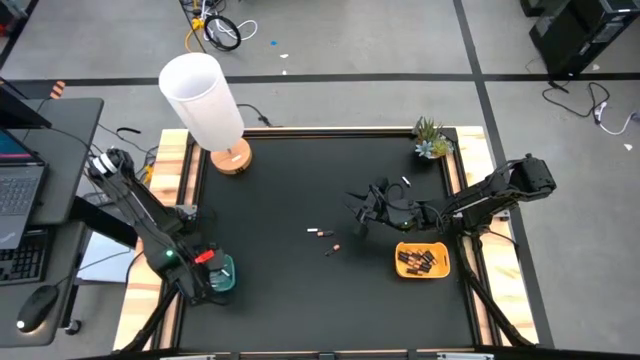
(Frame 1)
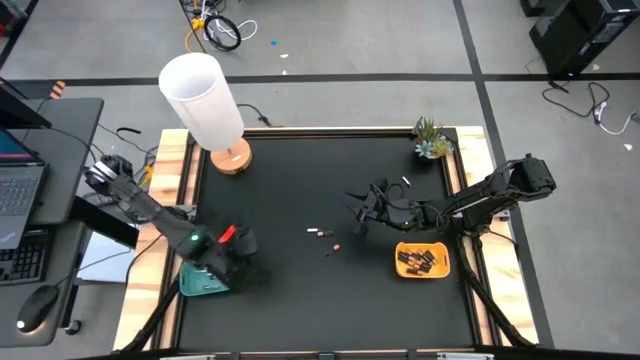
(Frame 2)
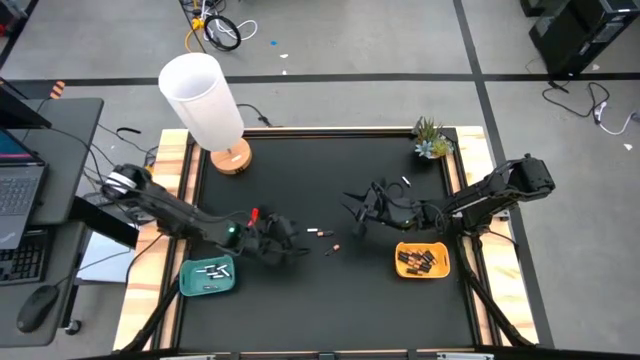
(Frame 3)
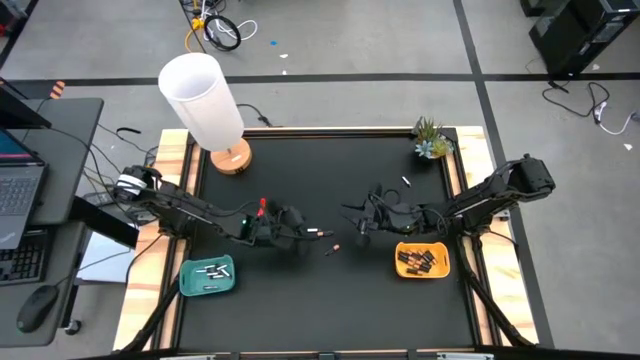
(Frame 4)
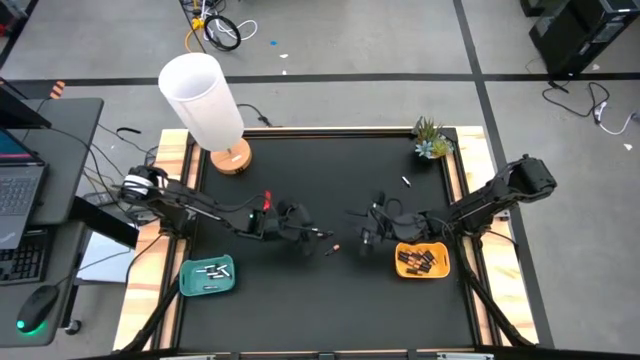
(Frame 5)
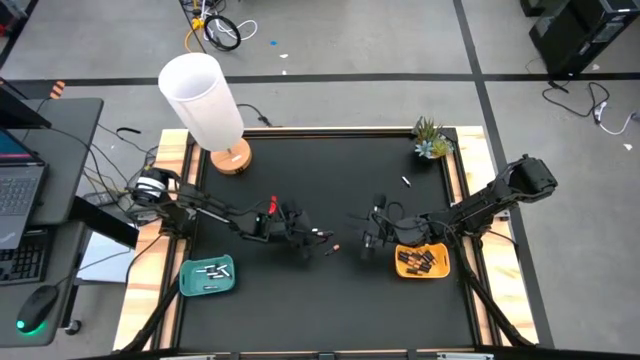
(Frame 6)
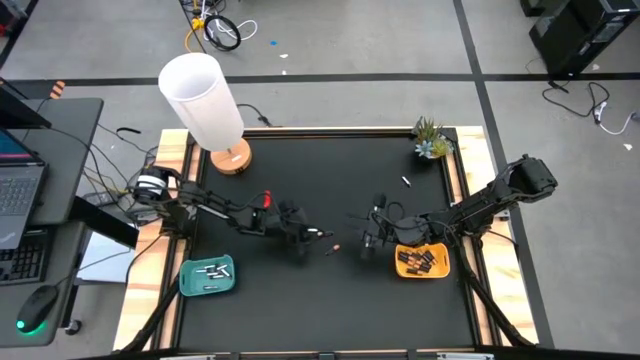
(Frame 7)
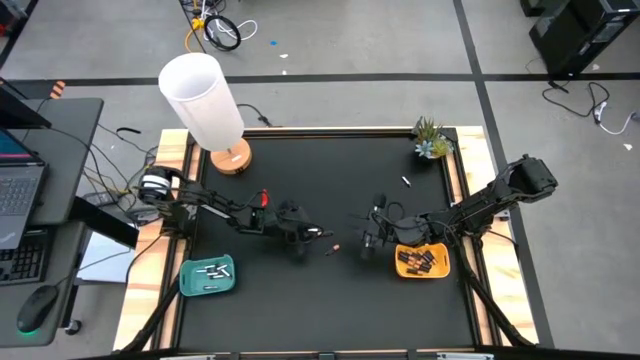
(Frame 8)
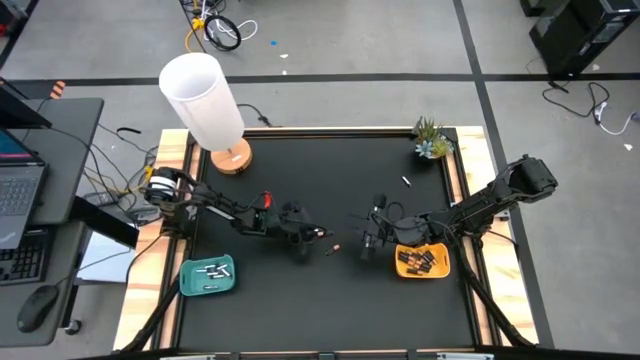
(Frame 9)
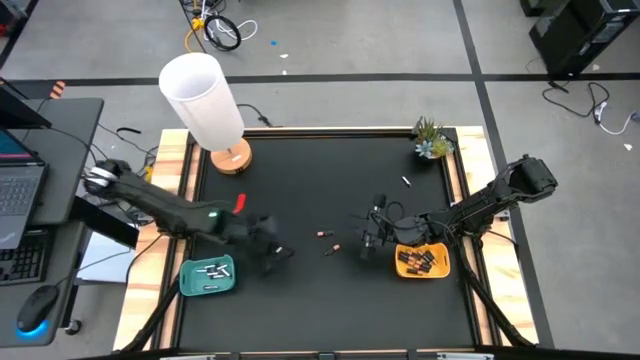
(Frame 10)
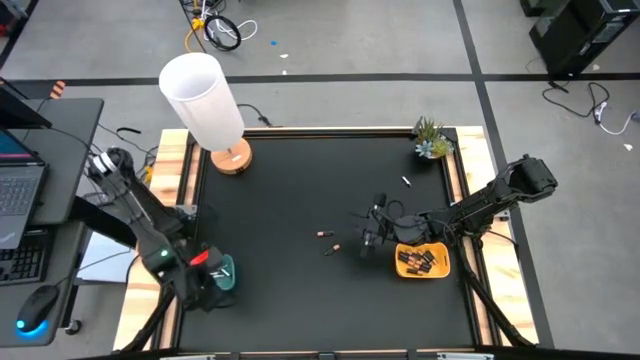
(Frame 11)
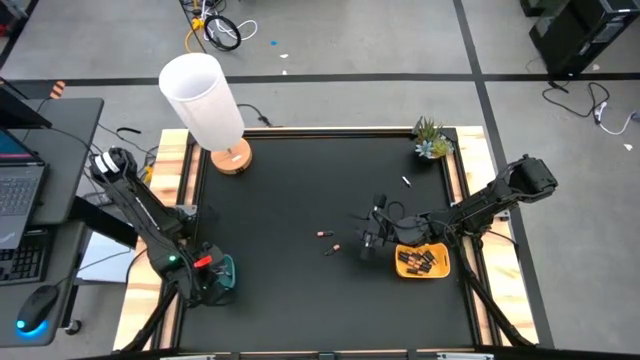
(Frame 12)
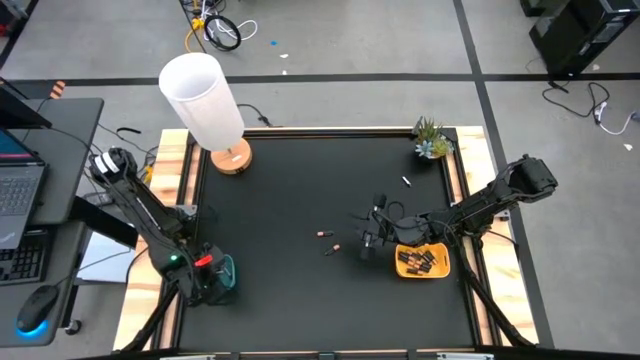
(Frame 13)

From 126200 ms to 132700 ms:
Task: Sort batteries
Put the silver battery into the green bin

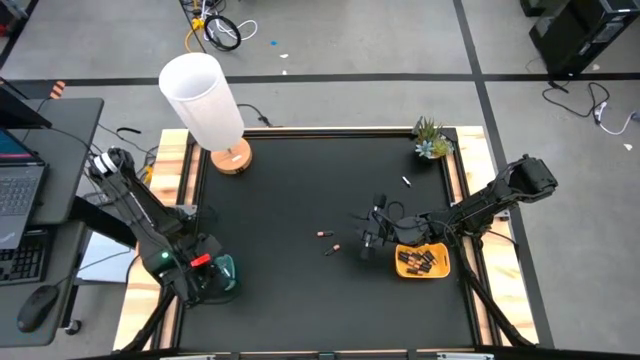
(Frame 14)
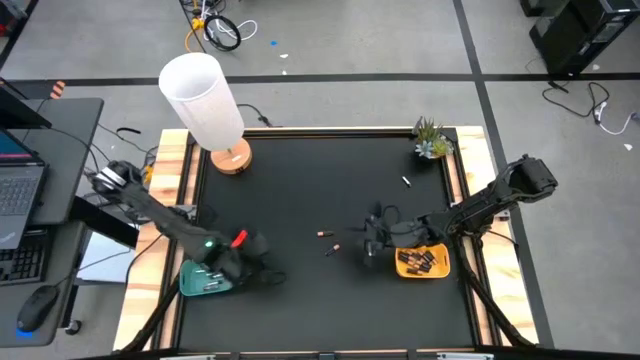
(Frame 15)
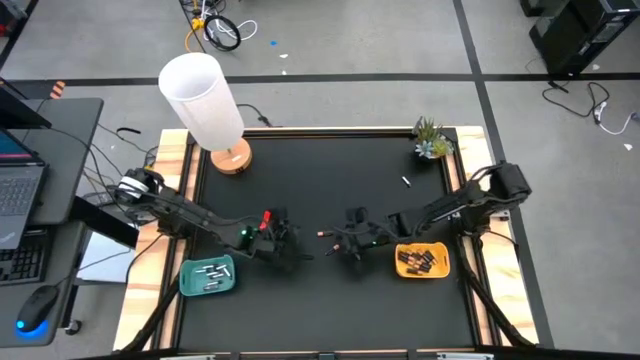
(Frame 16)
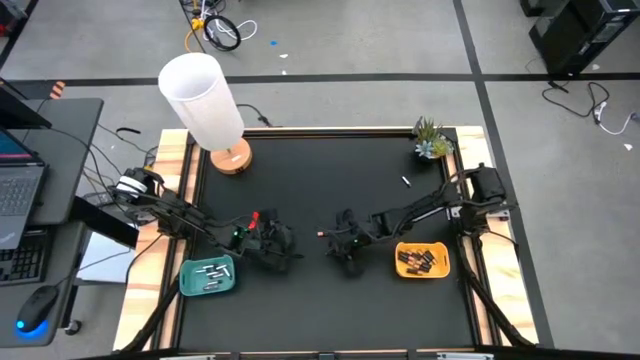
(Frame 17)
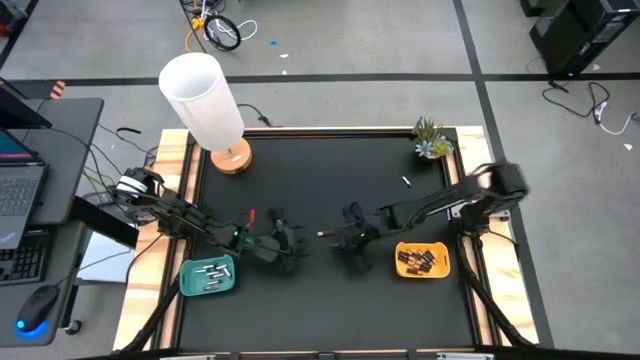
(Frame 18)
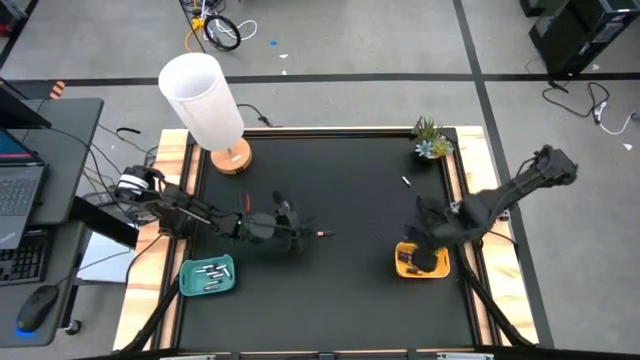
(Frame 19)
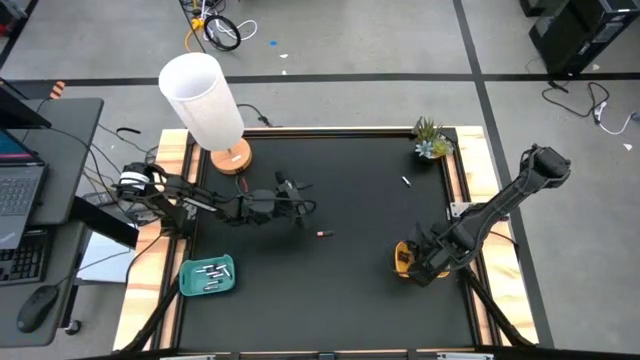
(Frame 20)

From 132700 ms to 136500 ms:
Put the black battery into the yellow bin

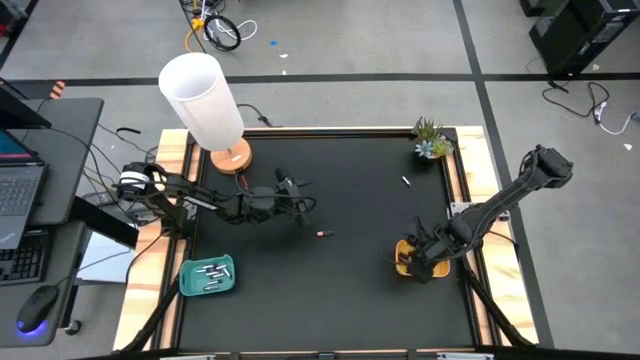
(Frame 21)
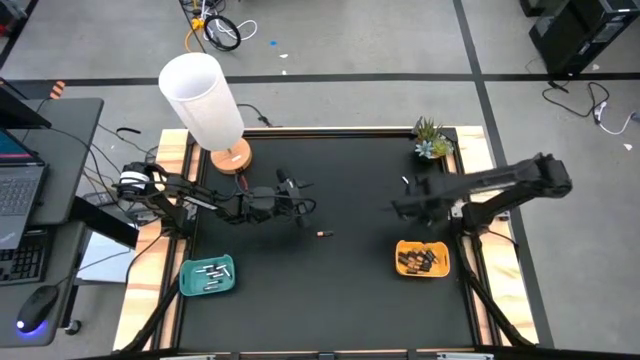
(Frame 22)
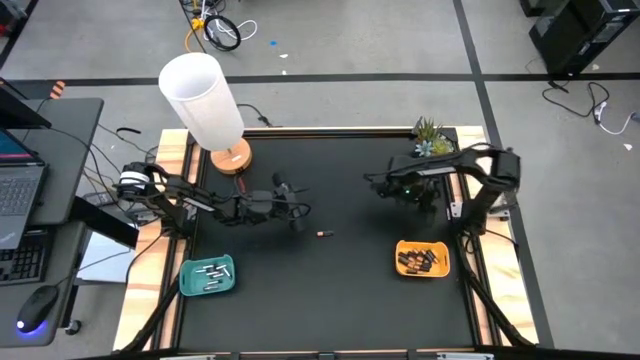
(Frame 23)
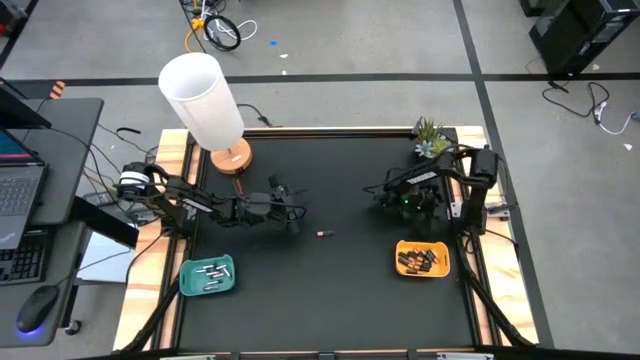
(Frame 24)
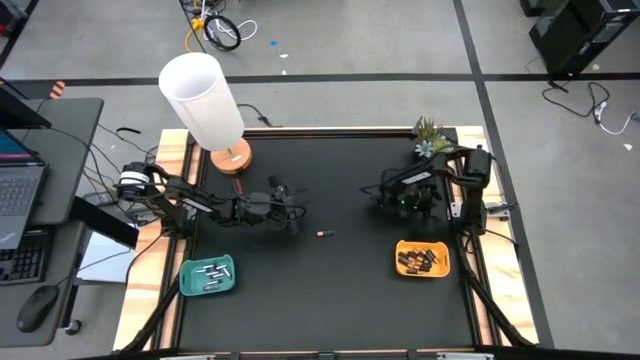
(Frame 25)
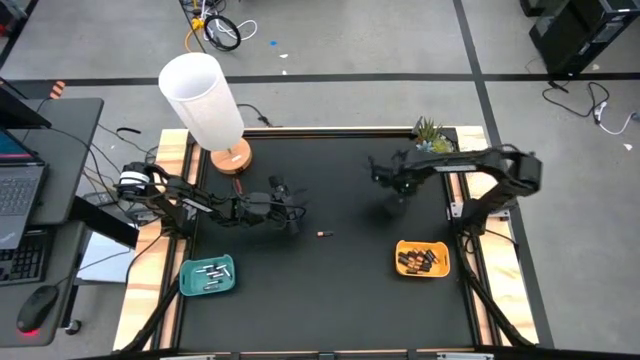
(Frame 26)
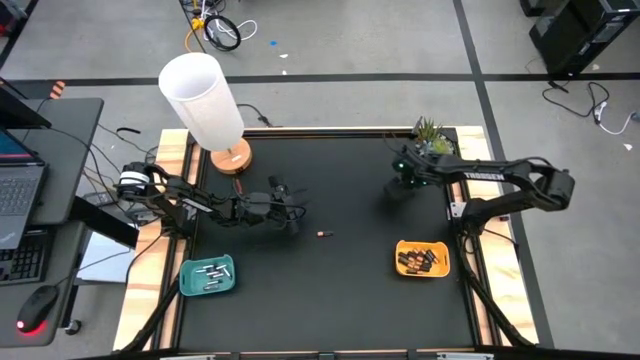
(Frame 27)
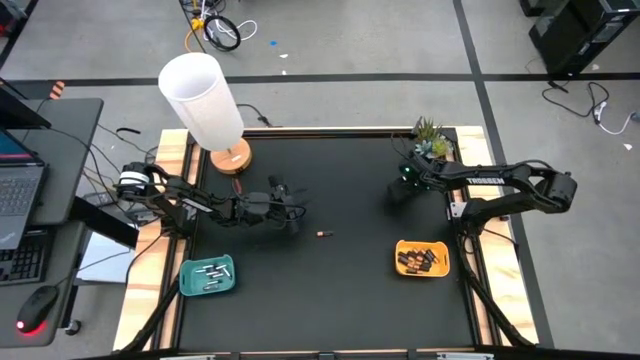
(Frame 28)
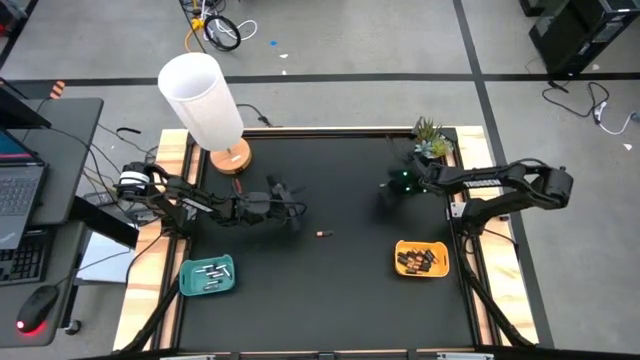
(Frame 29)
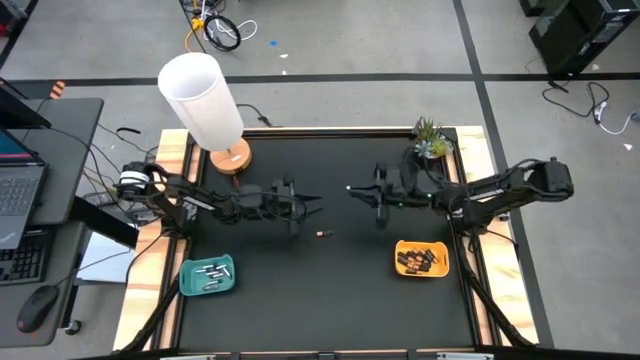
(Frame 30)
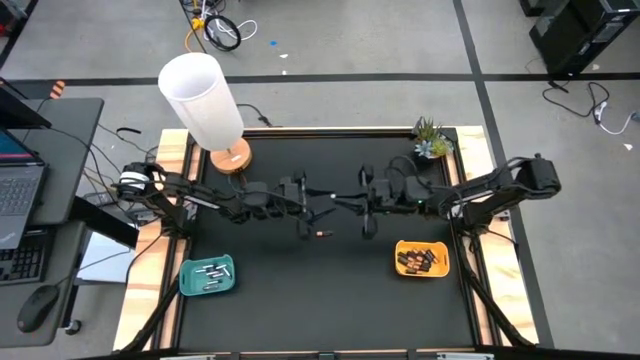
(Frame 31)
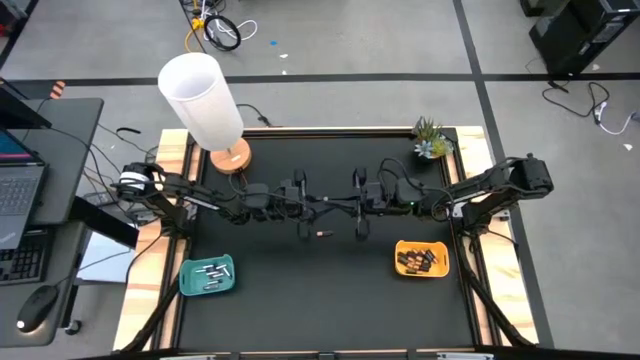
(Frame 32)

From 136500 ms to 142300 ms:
Put the silver battery into the green bin

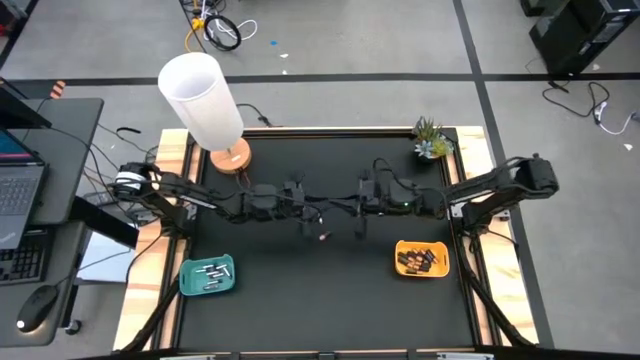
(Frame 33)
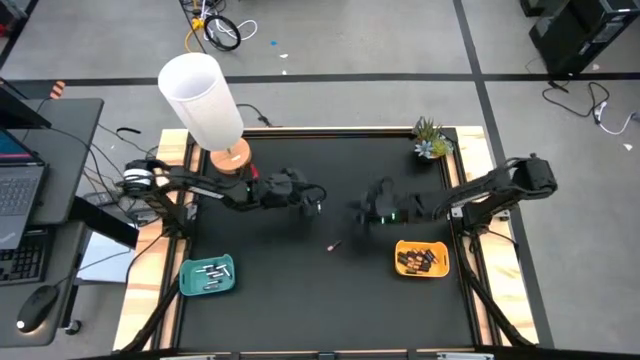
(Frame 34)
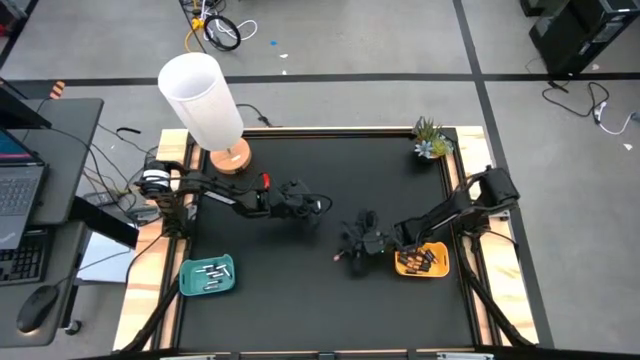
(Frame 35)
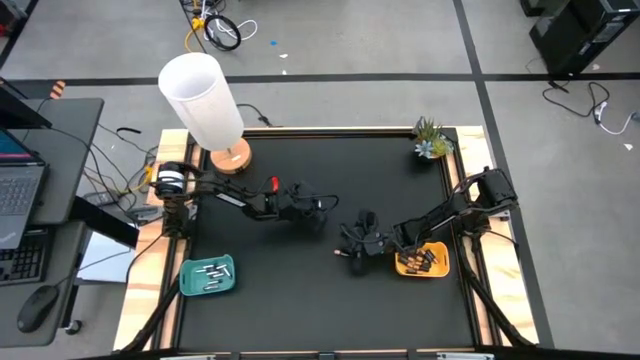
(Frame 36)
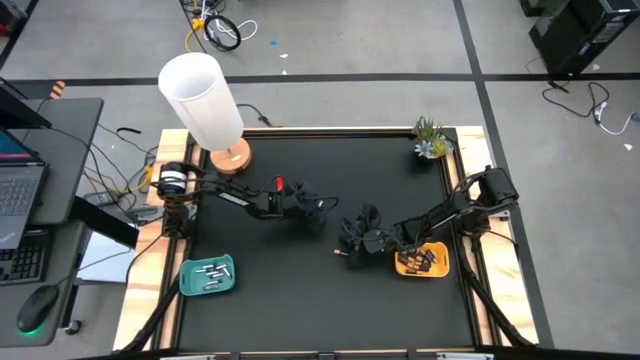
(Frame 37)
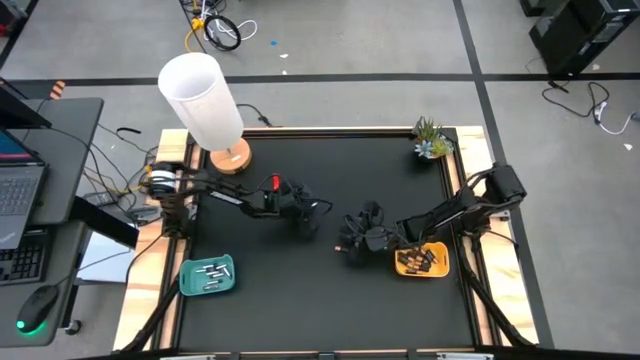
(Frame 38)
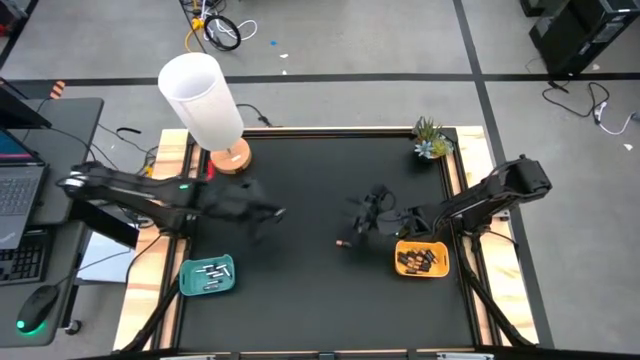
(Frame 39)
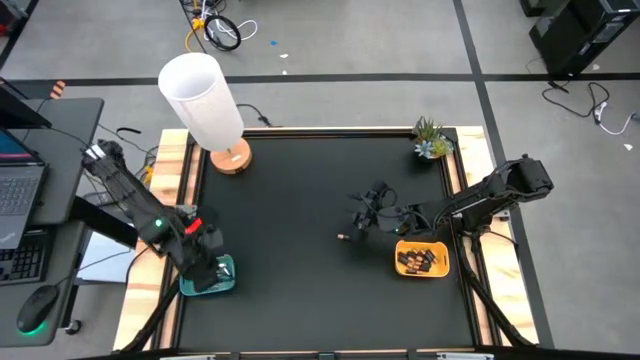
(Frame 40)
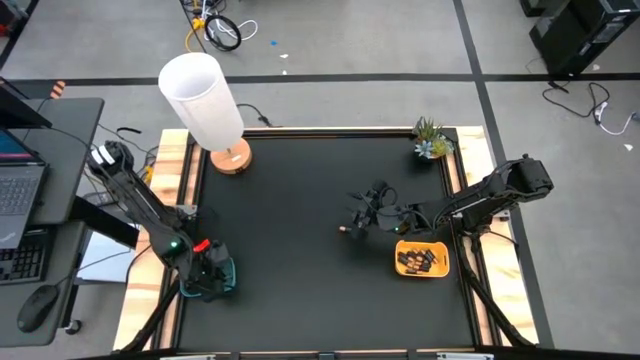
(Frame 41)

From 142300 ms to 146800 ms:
Put the silver battery into the green bin
